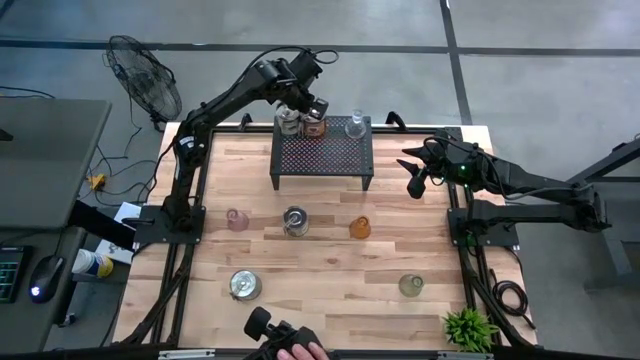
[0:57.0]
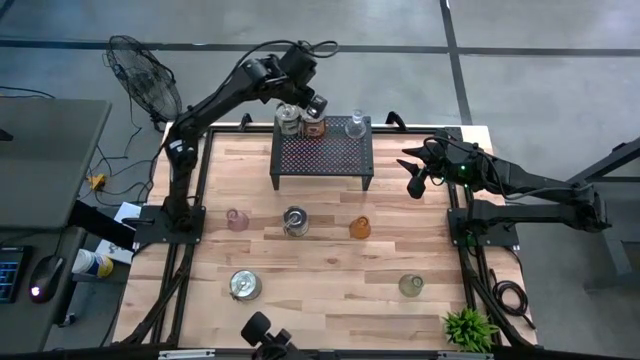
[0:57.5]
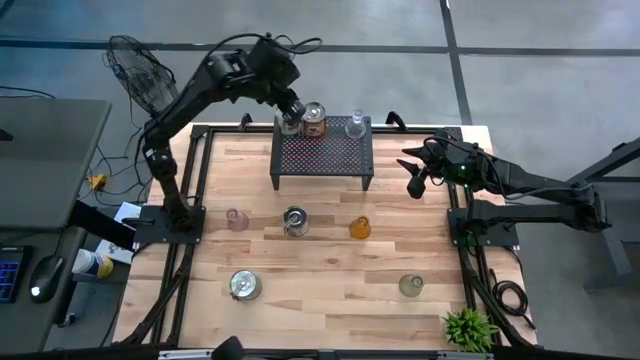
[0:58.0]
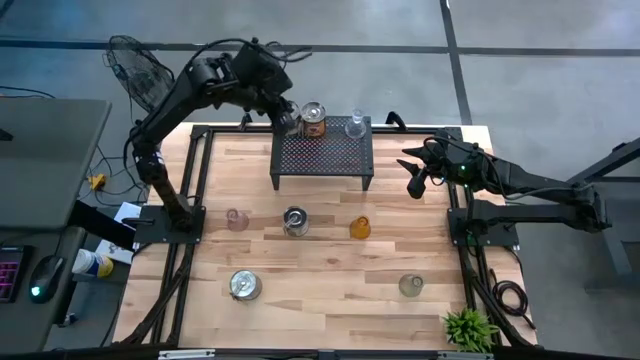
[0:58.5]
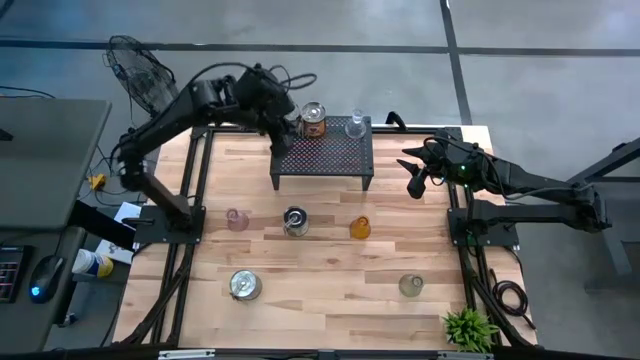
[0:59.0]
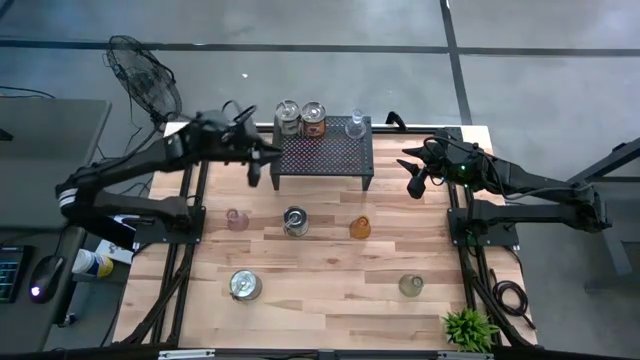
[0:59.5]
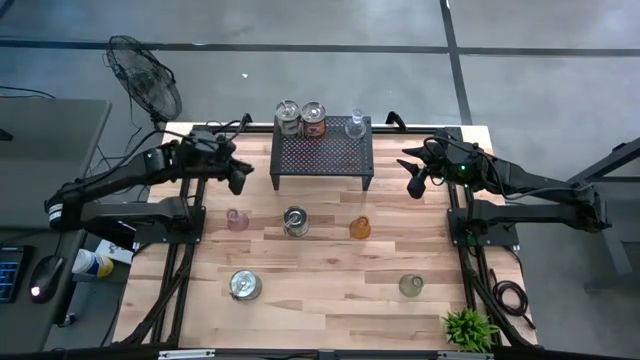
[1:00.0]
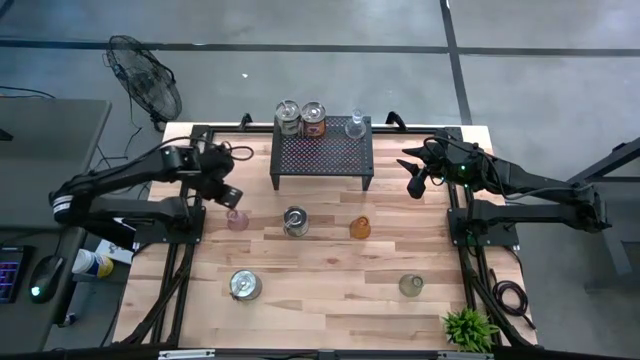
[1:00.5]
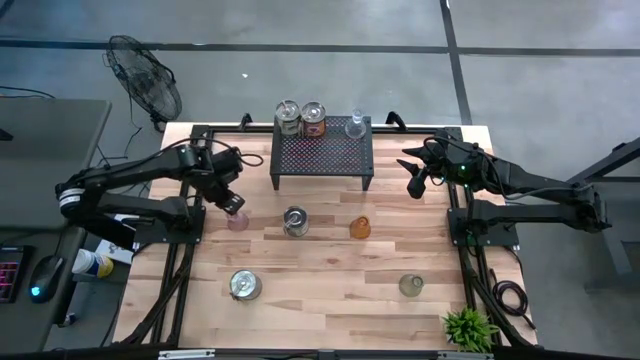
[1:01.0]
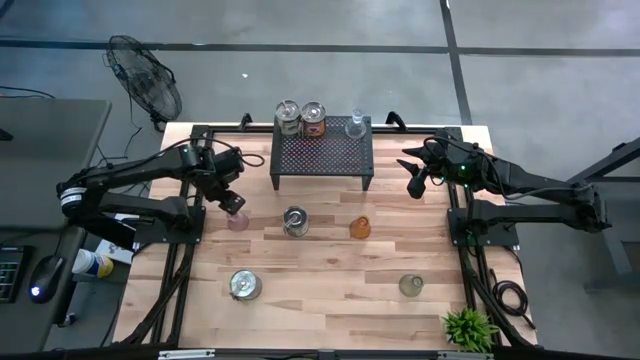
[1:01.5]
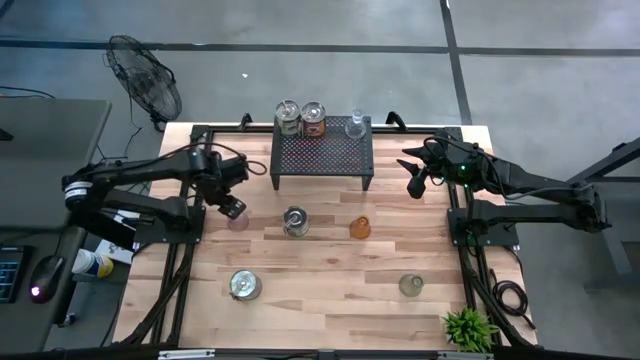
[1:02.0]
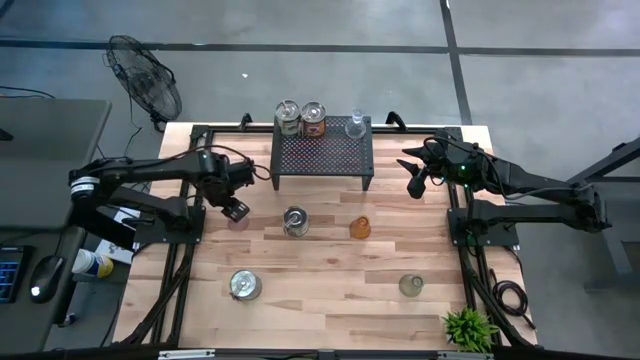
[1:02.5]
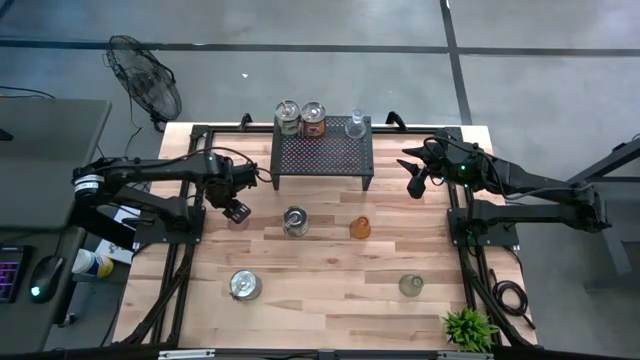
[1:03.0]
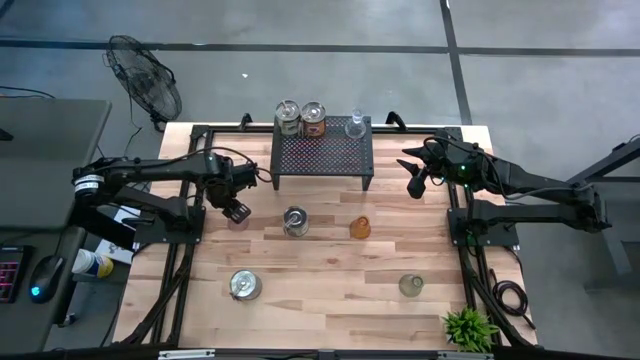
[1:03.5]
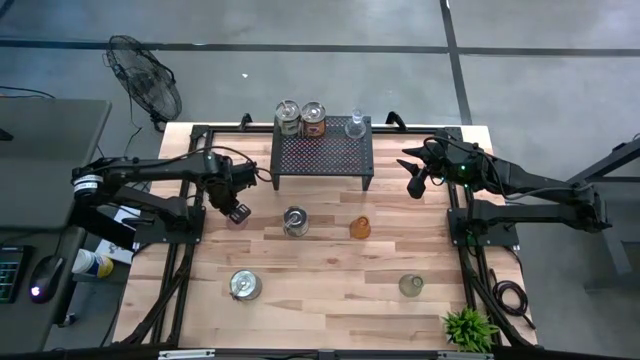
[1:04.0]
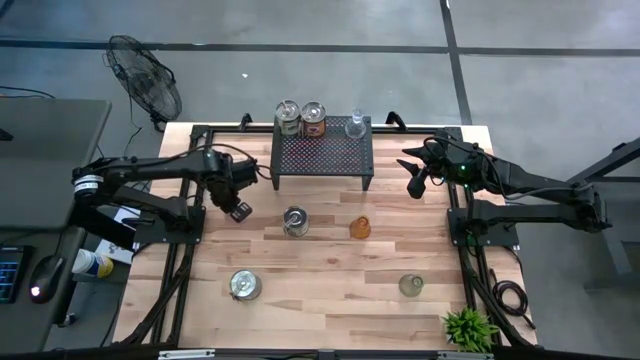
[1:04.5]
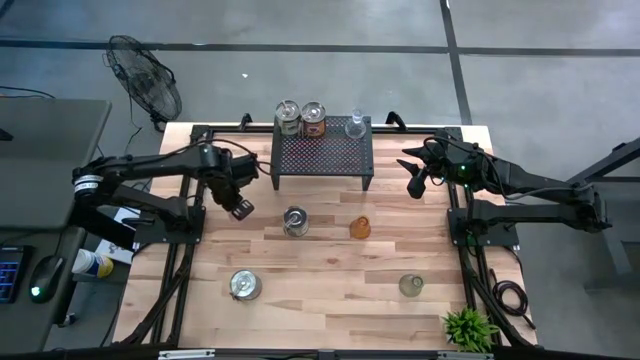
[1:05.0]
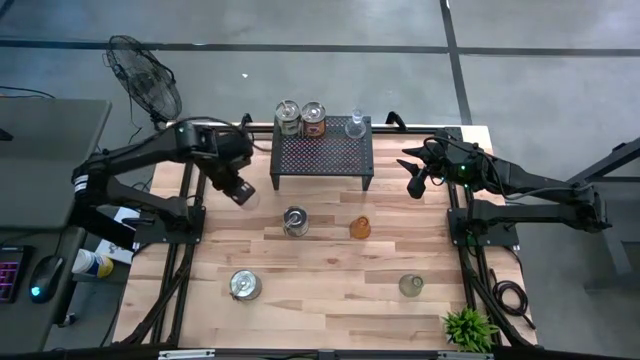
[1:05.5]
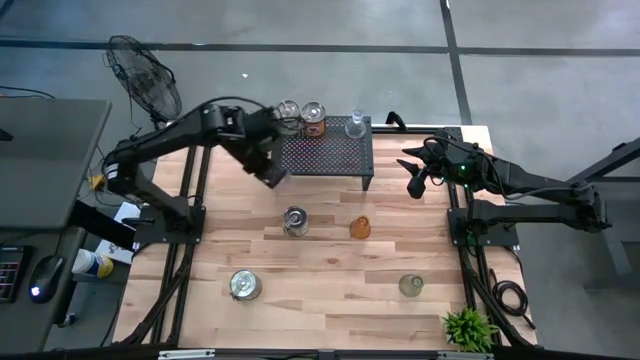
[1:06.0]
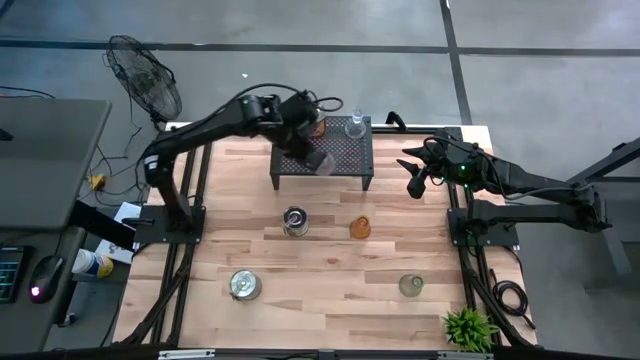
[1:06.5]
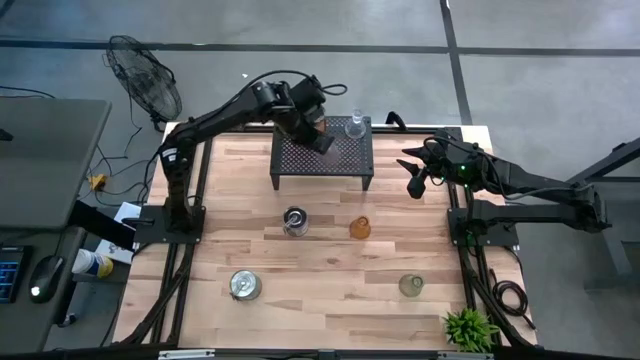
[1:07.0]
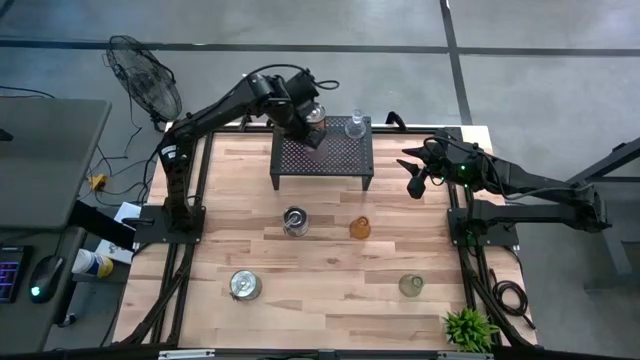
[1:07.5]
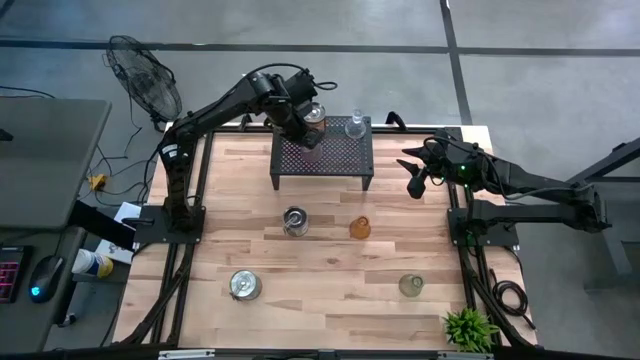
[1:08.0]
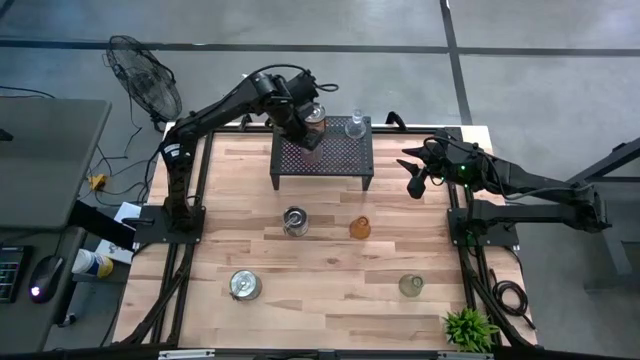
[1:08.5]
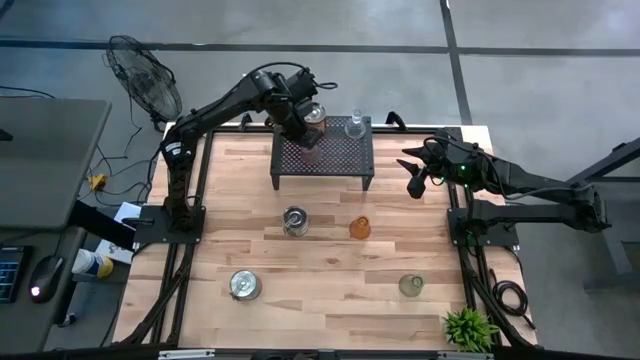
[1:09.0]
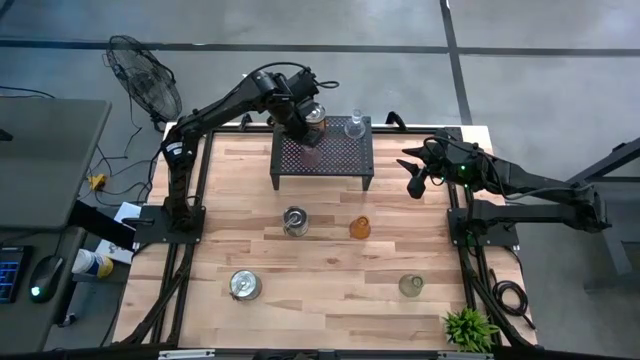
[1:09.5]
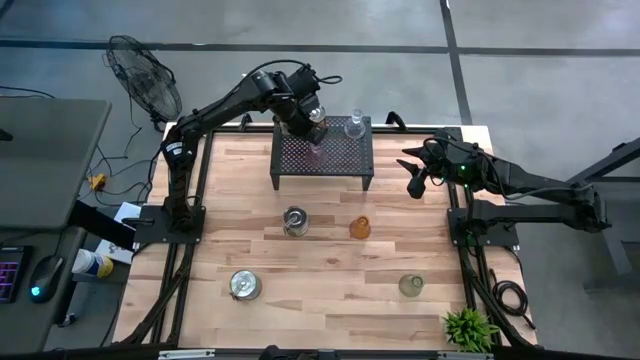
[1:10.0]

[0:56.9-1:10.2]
Task: Pick & Place candle stick holders
Put the pink candle holder on the shelf

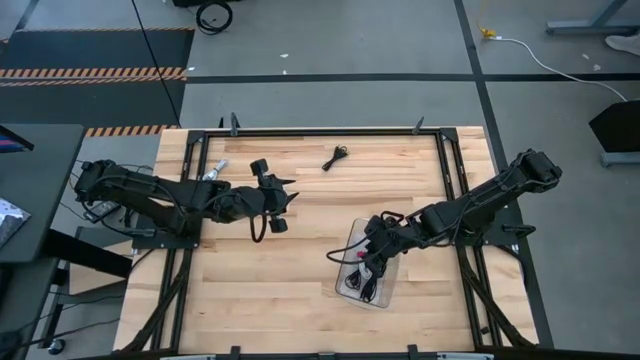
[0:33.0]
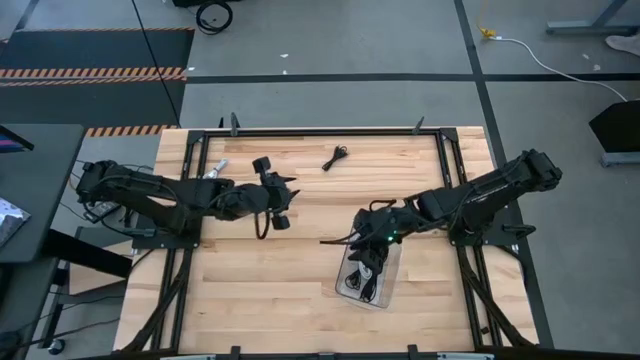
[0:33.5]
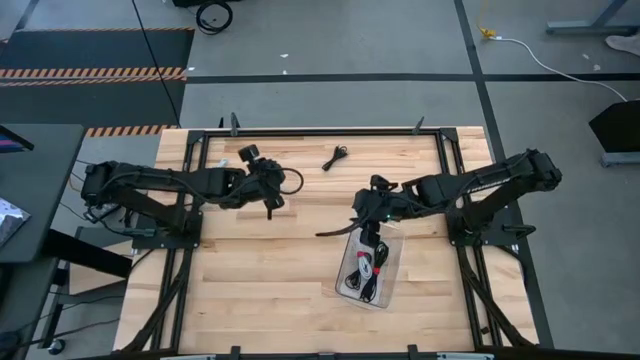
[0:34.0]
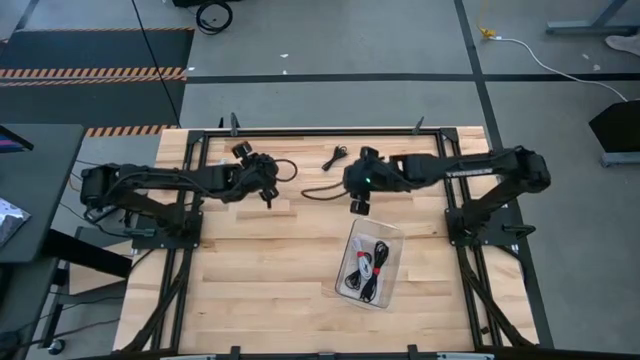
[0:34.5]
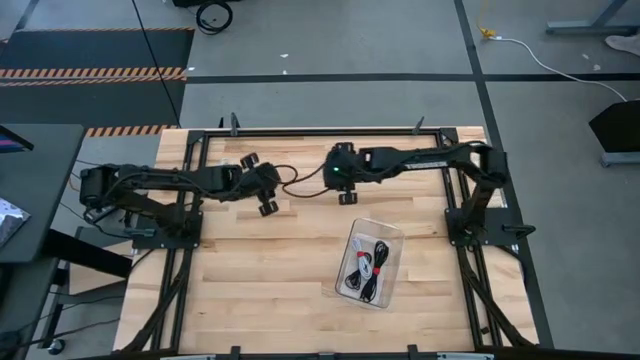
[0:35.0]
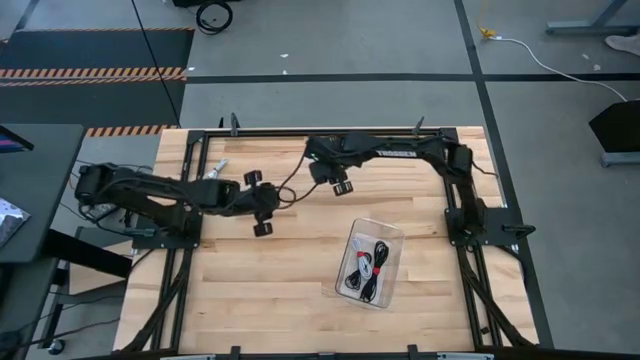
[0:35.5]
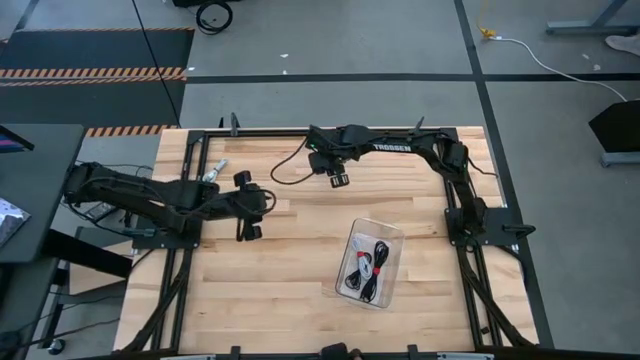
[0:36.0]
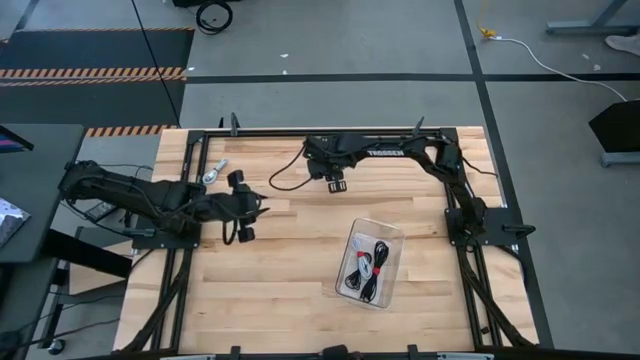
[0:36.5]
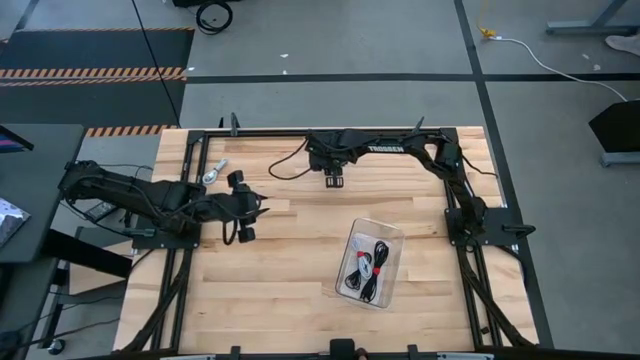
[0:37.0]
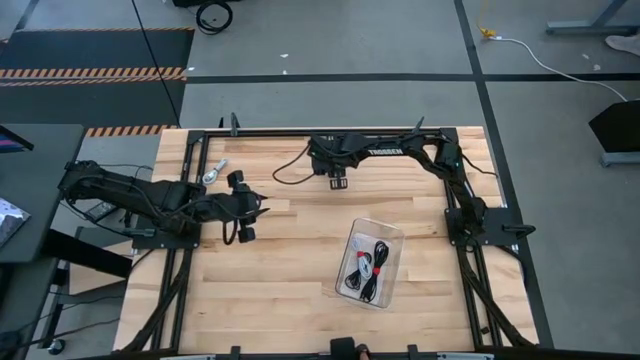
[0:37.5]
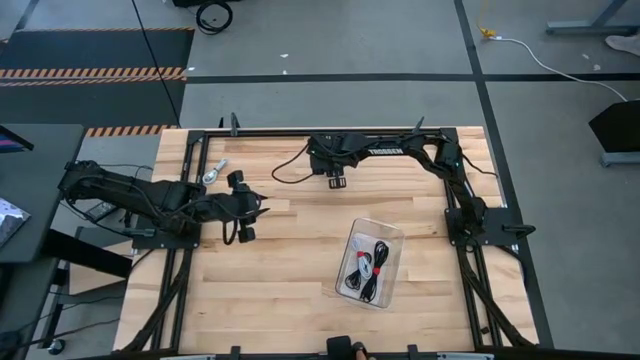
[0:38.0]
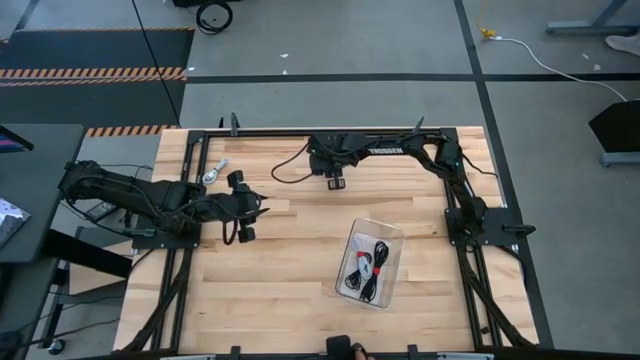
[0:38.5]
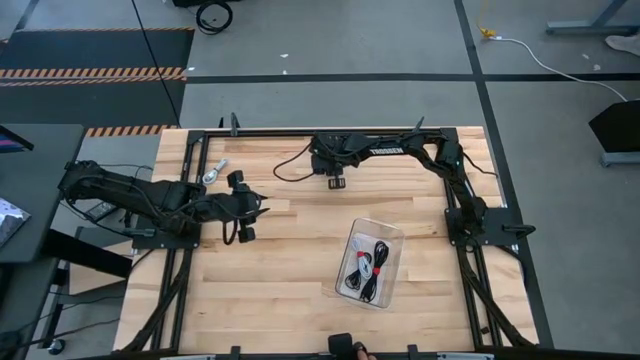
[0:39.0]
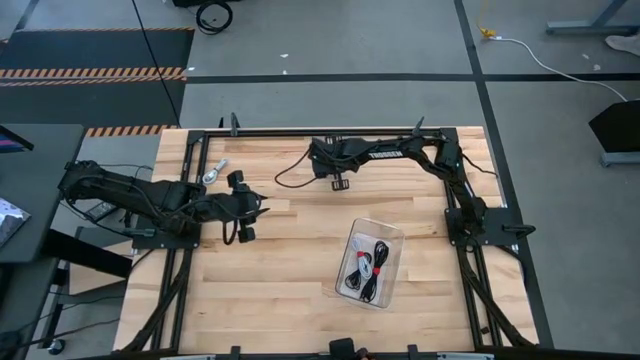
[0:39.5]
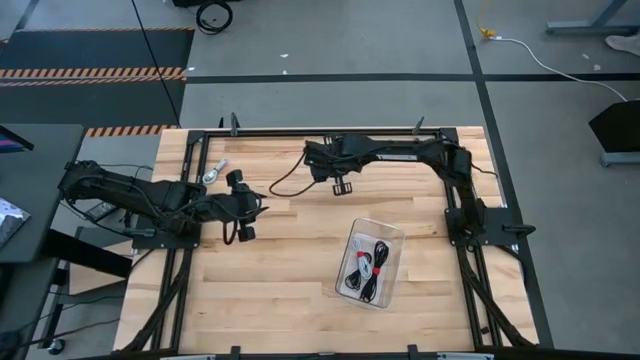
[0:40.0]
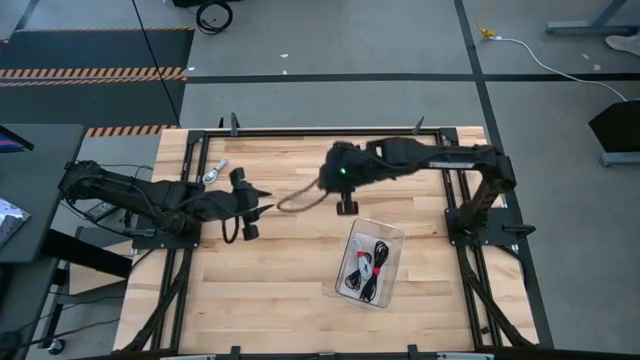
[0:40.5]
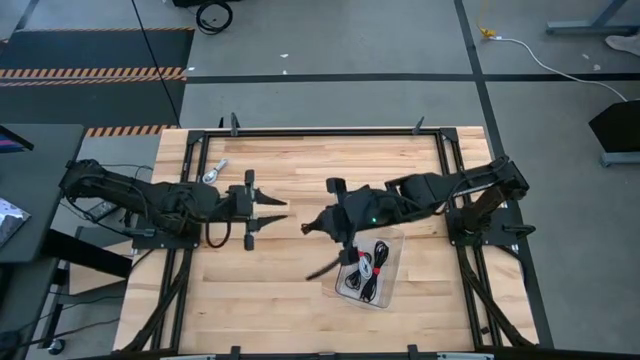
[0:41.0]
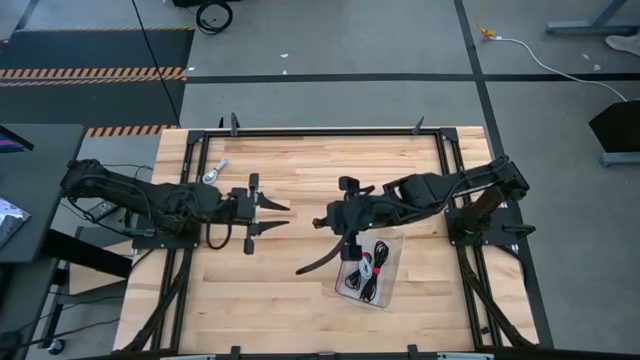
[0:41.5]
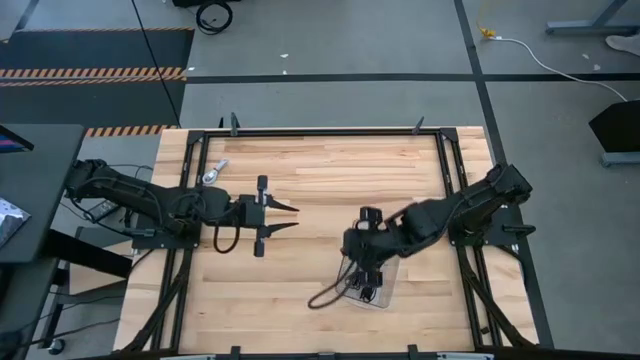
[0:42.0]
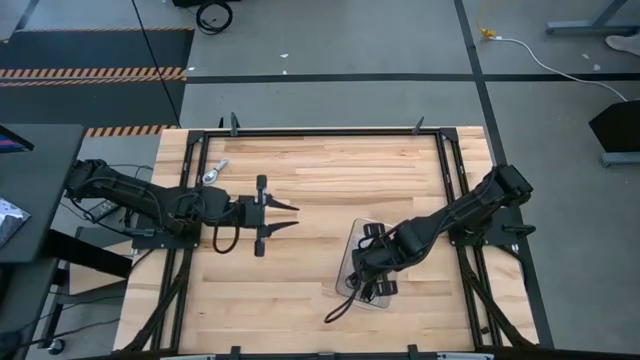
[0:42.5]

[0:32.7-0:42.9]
Task: Pick and place USB-C Cables
Put the black USB charger cable into the transparent bin
